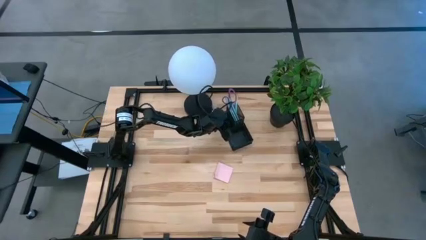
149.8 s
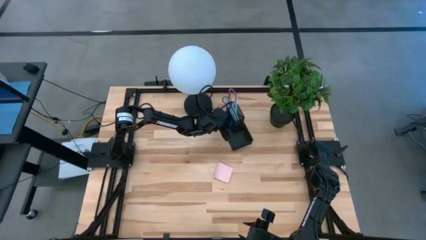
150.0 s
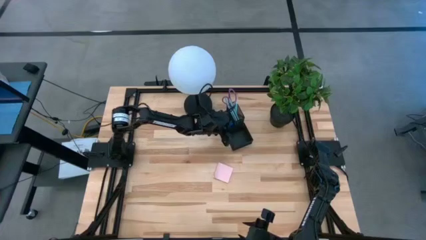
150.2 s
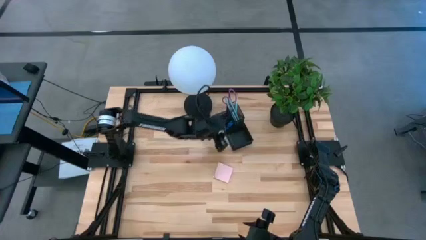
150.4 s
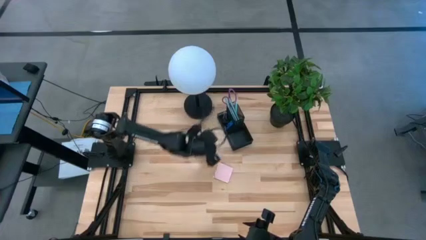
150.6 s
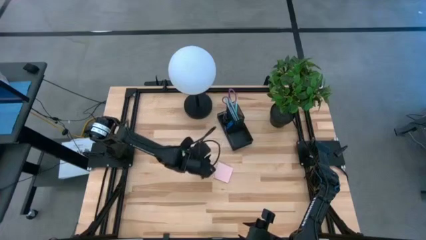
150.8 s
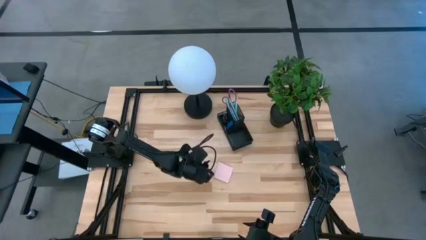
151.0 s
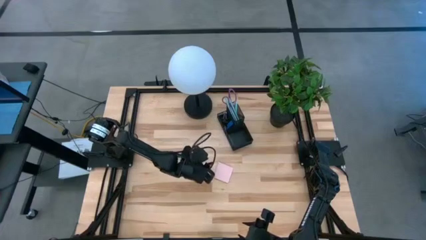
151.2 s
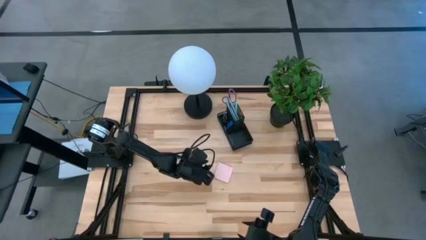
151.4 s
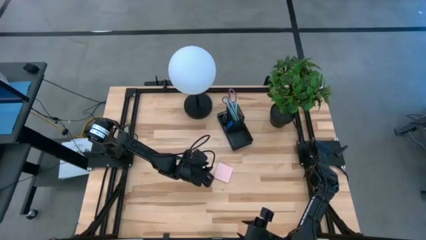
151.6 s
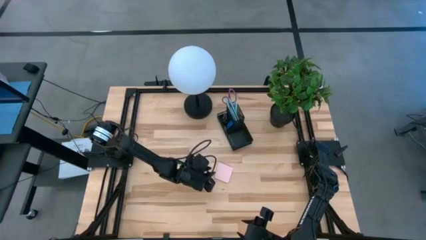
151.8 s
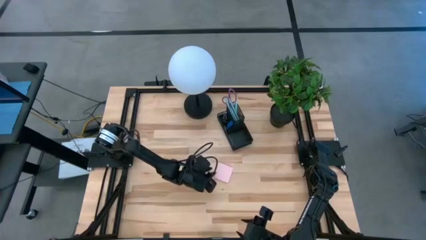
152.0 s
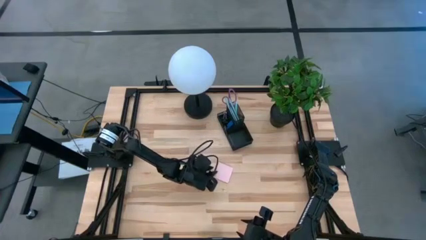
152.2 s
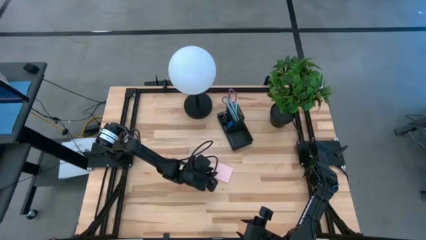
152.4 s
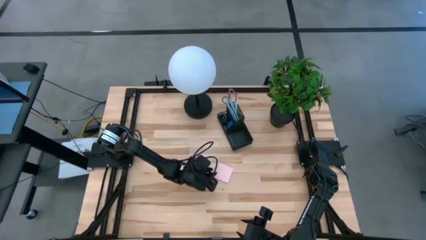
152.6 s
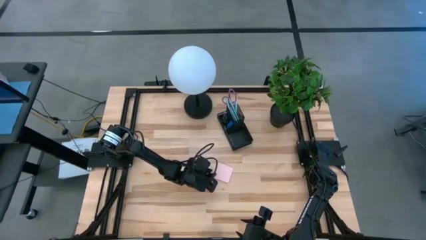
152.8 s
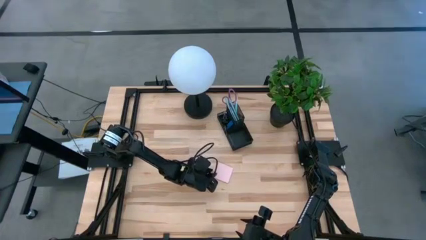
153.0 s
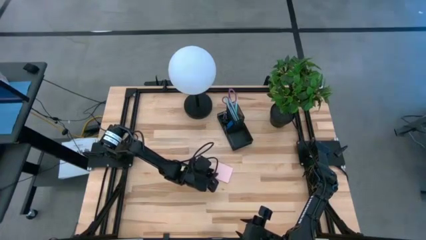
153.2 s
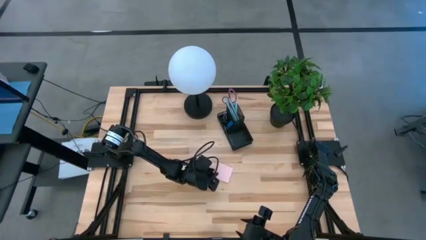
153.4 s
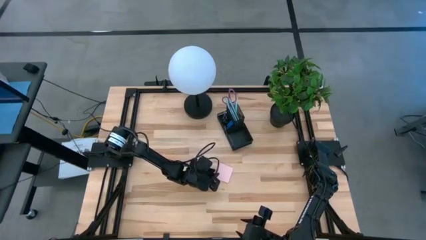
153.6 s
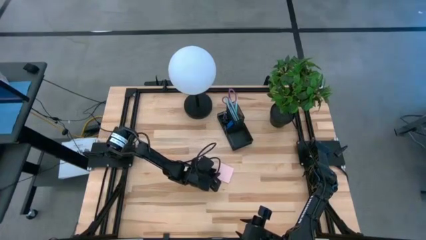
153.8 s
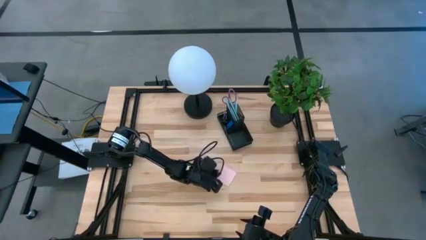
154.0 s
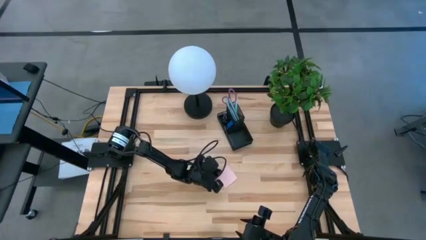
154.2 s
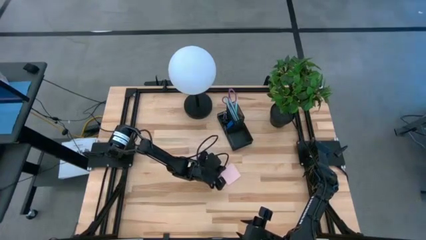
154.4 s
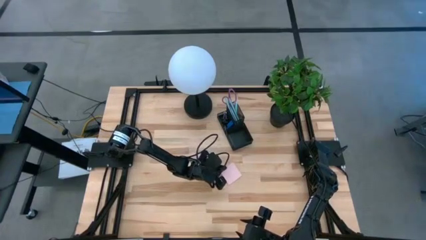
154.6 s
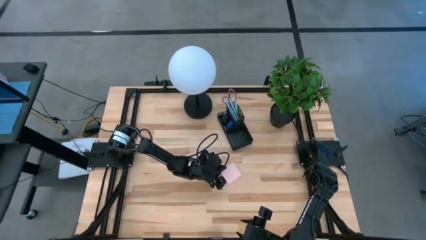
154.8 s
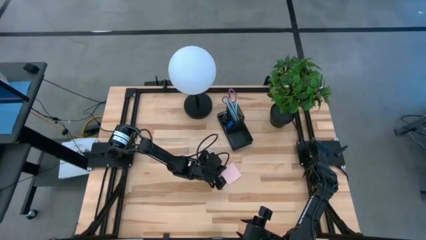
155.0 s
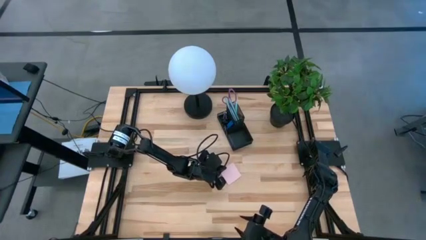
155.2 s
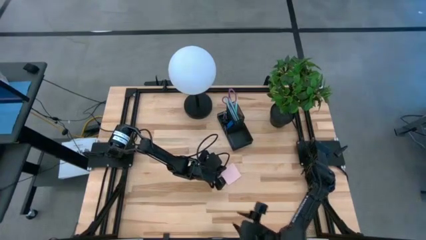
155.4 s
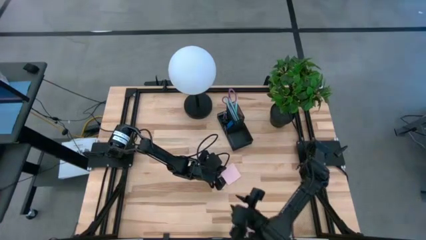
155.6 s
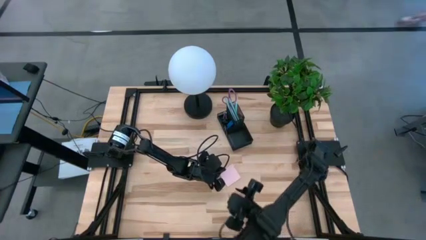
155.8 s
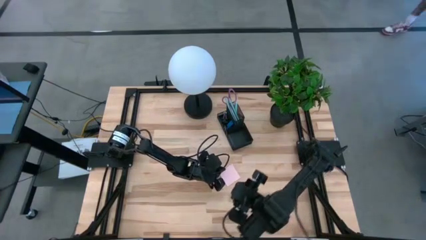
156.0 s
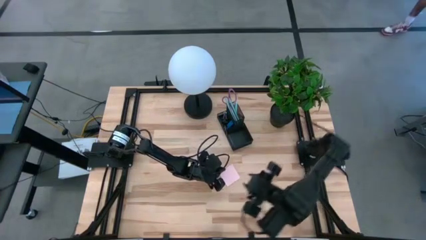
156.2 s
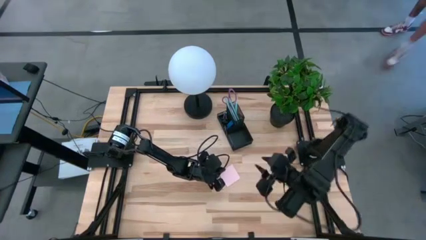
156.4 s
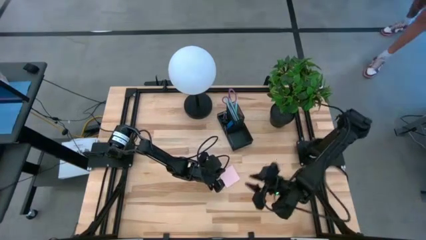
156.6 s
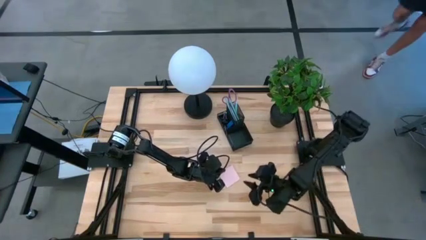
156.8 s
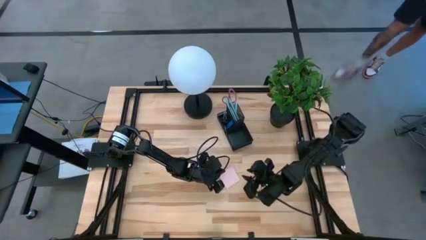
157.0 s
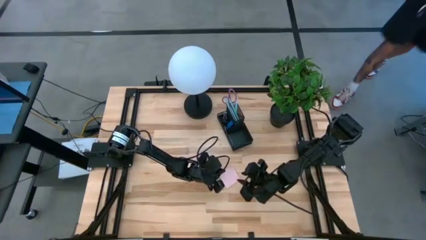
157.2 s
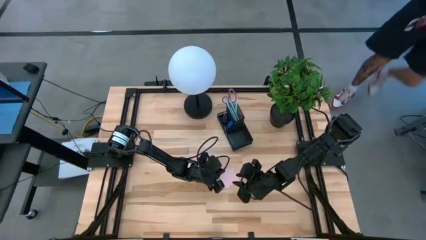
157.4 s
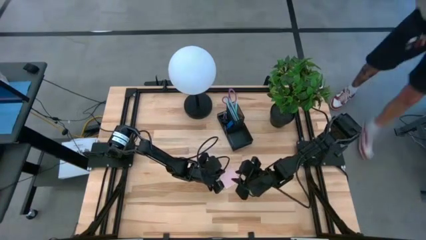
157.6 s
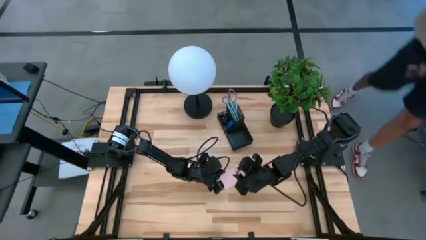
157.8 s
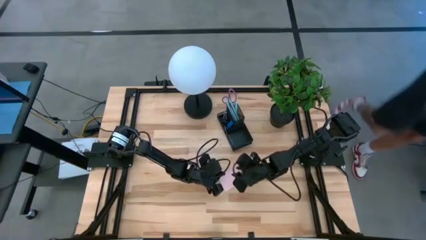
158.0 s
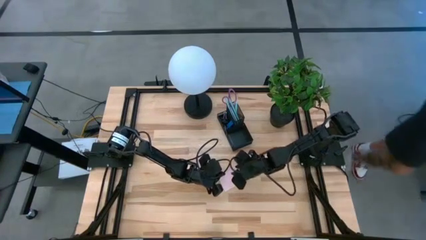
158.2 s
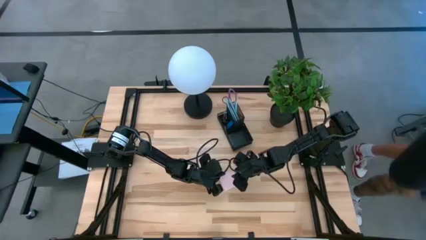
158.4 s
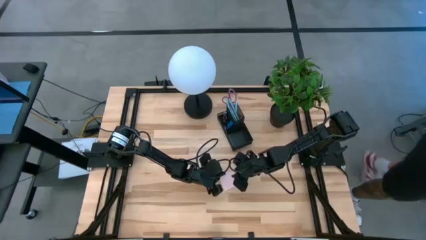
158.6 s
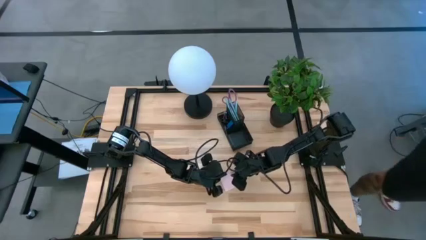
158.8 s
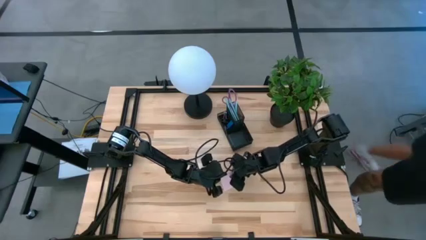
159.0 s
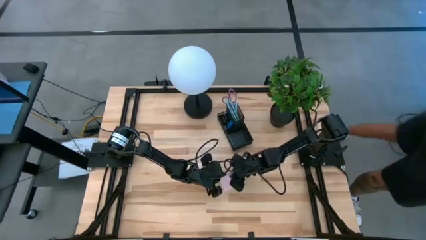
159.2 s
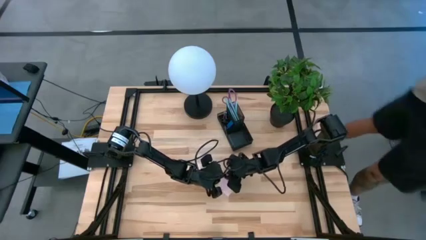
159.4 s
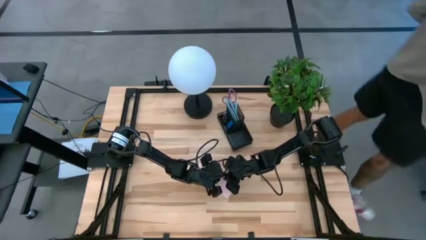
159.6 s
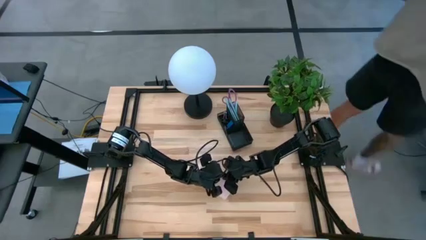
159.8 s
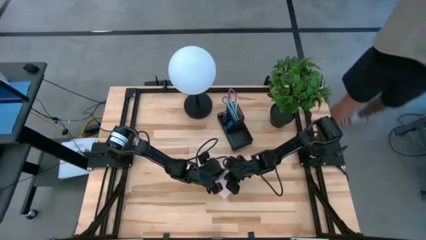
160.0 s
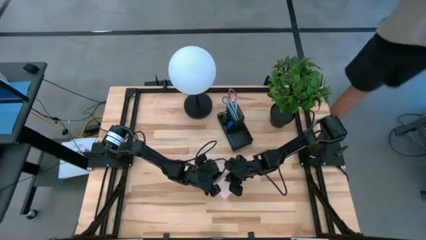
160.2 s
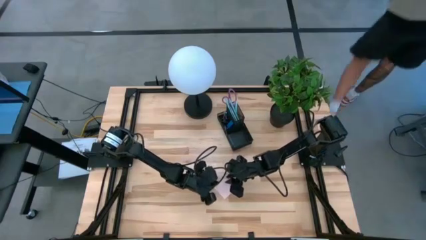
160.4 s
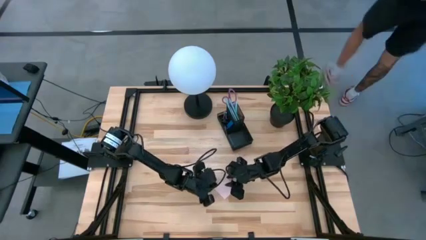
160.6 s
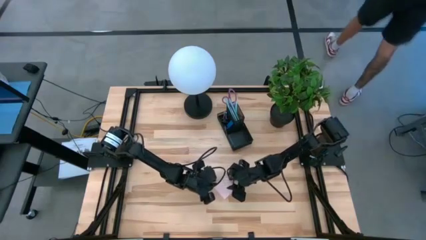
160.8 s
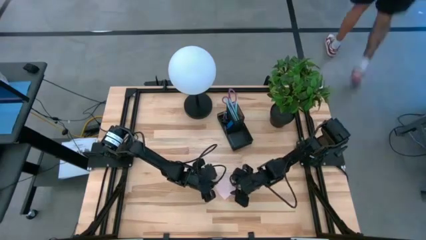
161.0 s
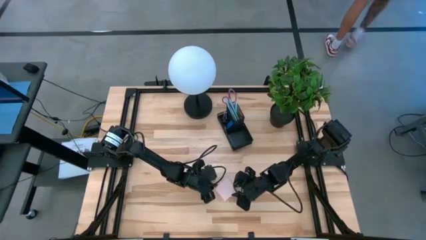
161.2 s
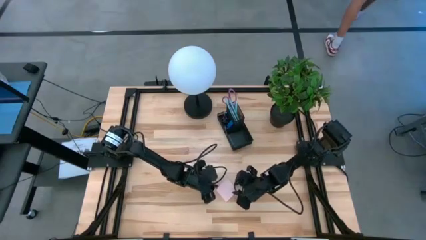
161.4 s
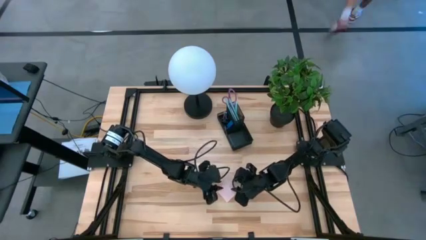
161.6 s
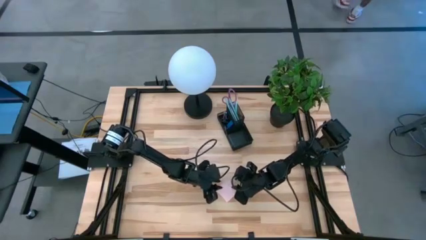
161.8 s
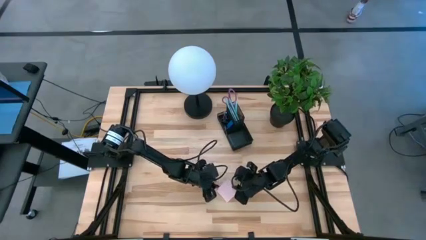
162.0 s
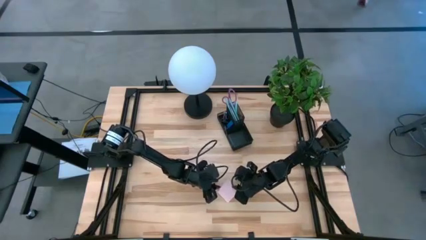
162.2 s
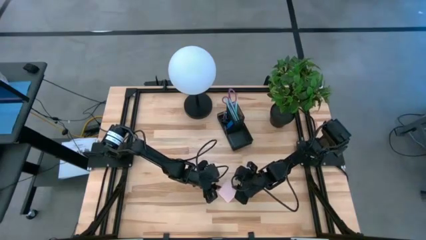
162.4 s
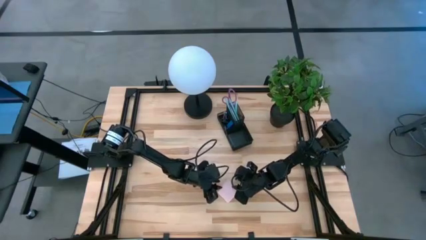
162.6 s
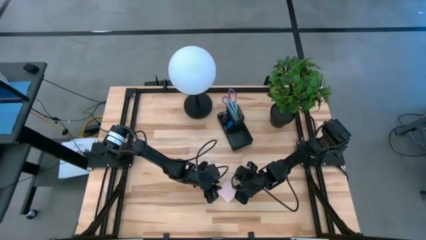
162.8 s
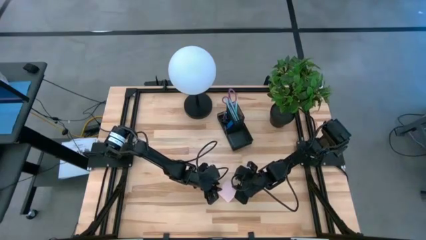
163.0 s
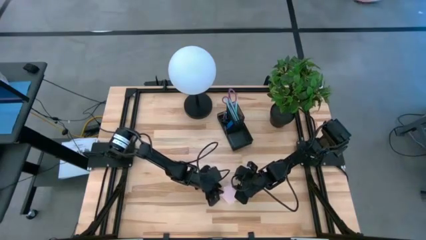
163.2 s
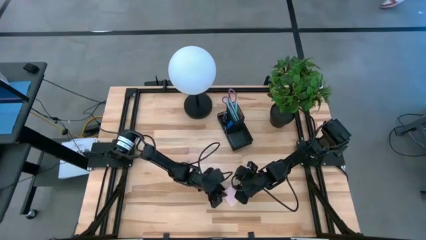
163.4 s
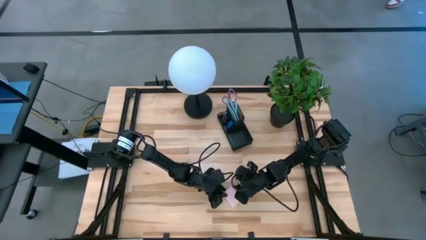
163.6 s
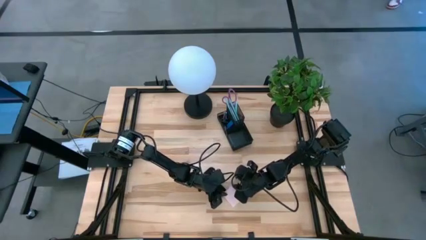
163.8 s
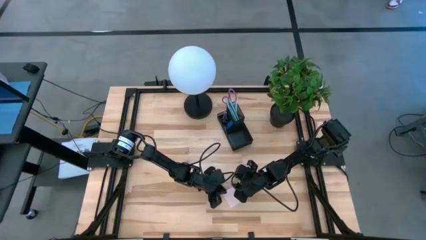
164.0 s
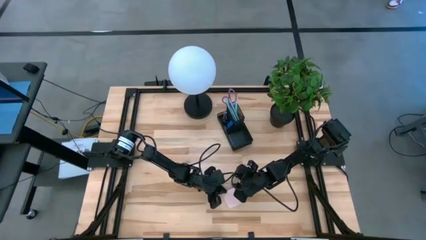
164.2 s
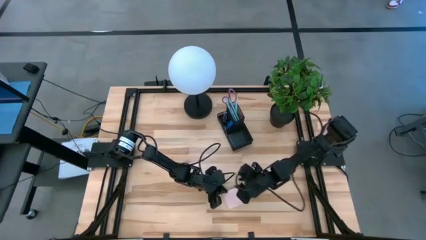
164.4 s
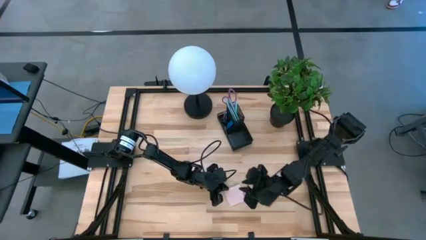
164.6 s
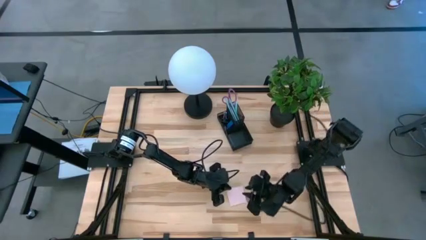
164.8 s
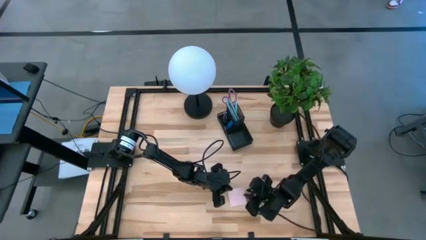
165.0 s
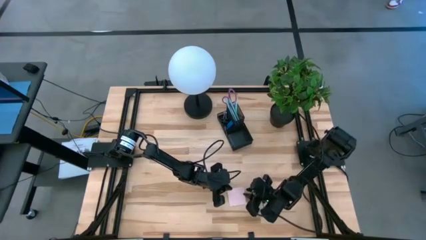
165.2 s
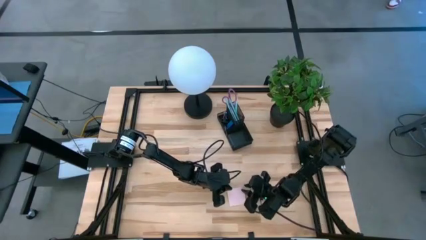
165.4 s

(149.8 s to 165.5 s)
Task: Pick and place office supplies into organizer
Put the pink sticky note into the desk organizer
